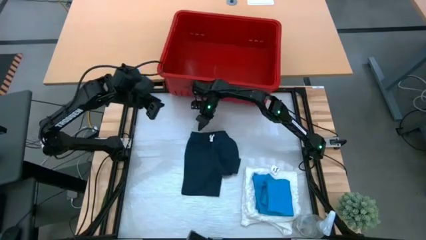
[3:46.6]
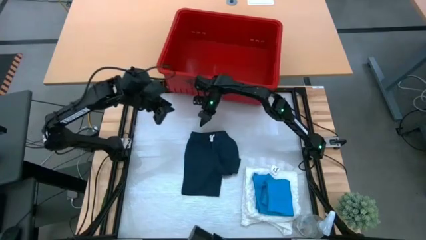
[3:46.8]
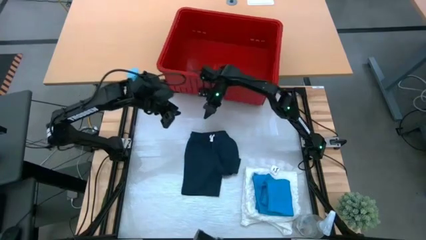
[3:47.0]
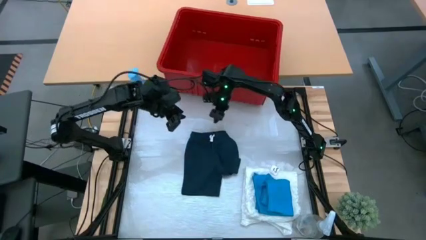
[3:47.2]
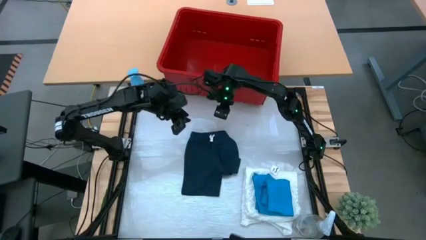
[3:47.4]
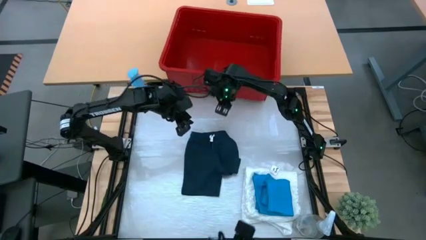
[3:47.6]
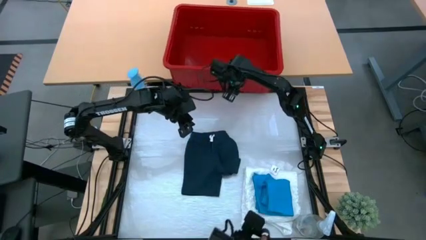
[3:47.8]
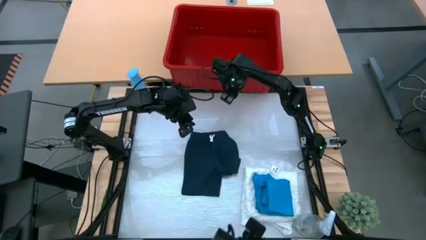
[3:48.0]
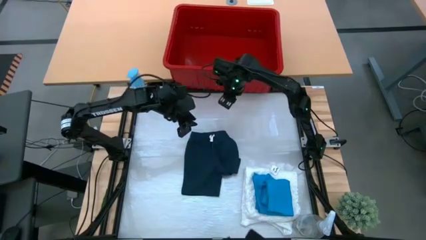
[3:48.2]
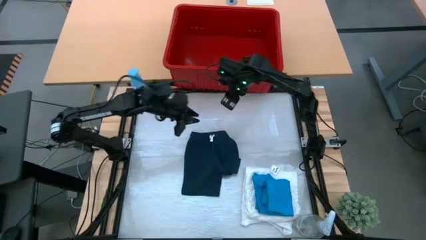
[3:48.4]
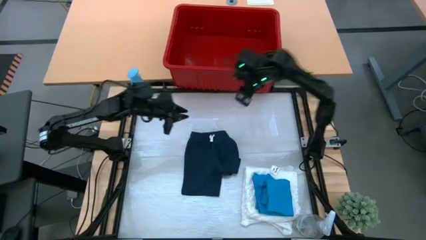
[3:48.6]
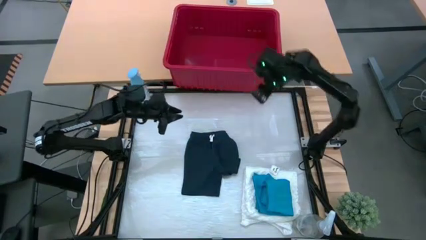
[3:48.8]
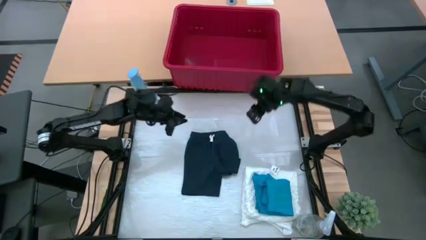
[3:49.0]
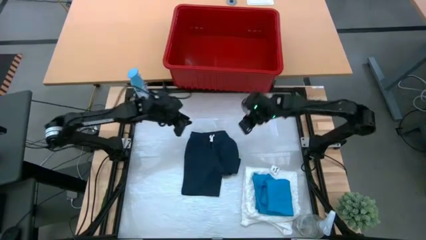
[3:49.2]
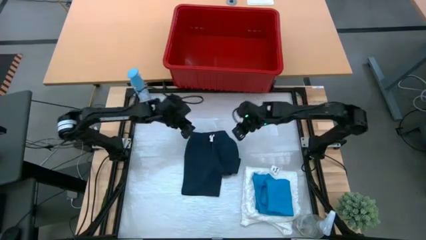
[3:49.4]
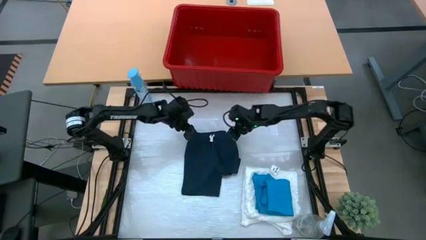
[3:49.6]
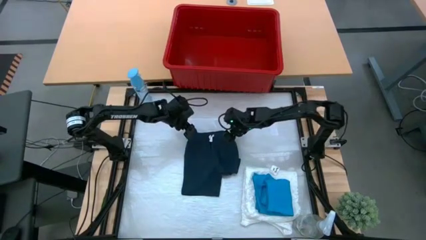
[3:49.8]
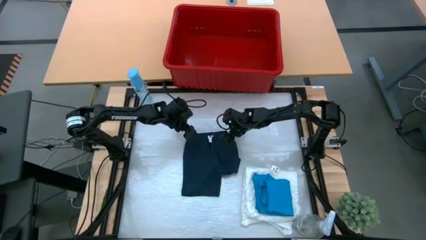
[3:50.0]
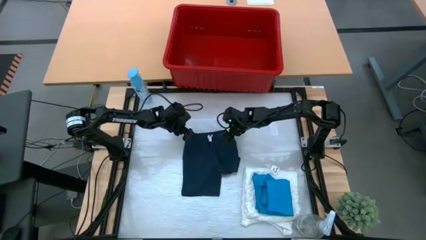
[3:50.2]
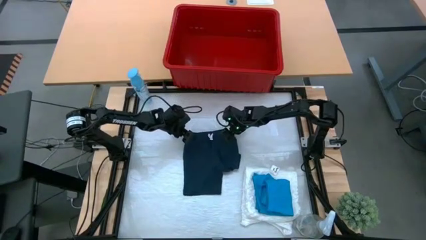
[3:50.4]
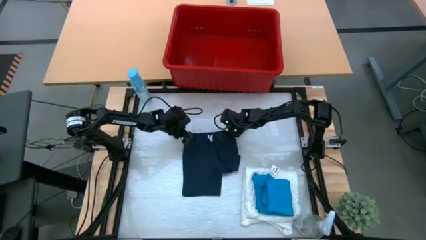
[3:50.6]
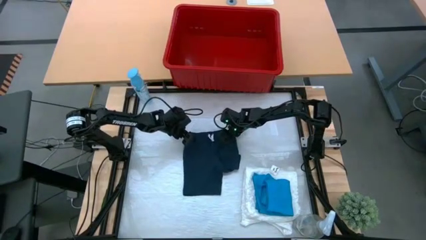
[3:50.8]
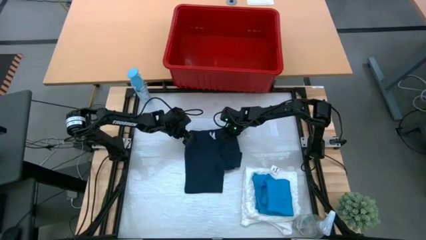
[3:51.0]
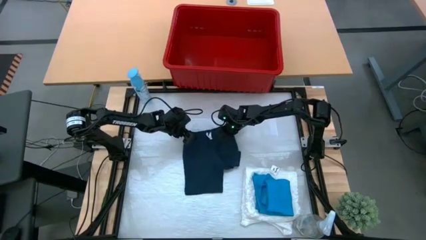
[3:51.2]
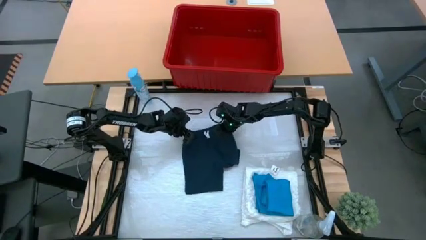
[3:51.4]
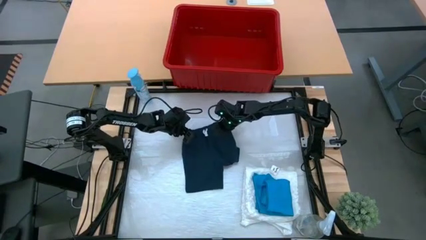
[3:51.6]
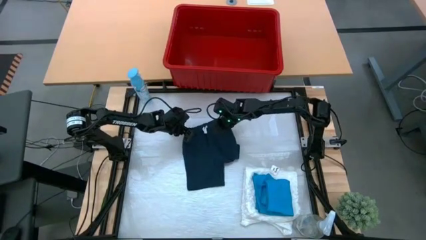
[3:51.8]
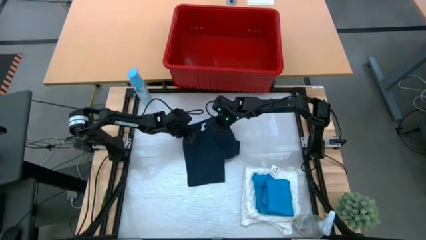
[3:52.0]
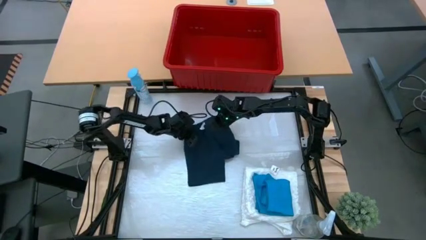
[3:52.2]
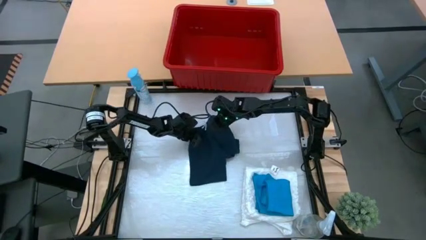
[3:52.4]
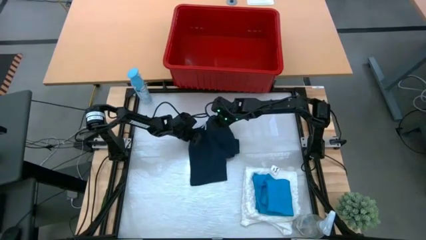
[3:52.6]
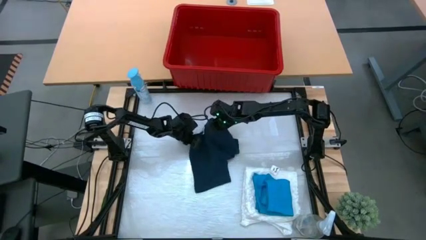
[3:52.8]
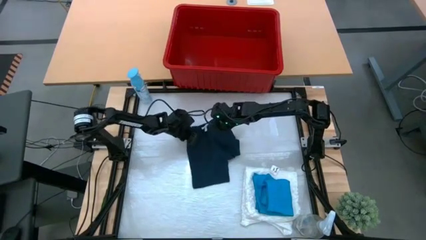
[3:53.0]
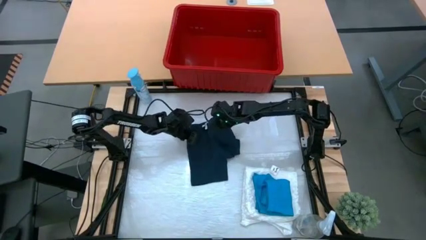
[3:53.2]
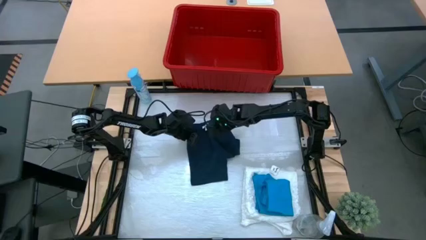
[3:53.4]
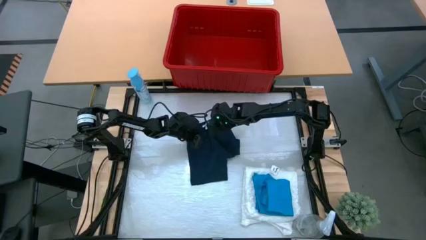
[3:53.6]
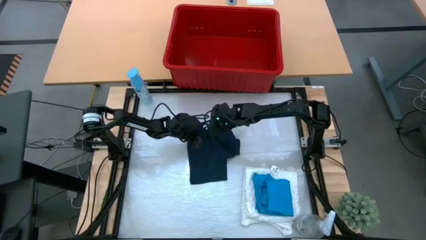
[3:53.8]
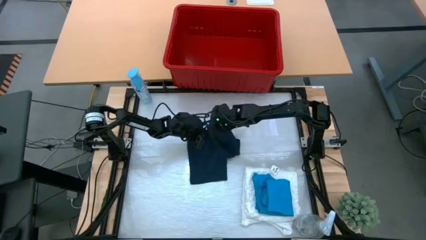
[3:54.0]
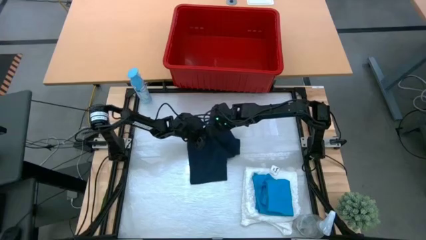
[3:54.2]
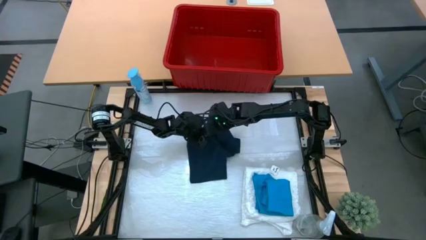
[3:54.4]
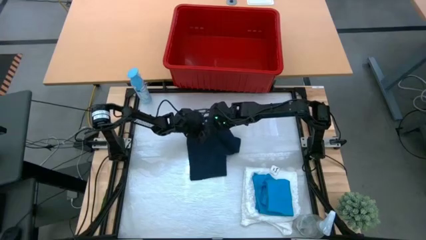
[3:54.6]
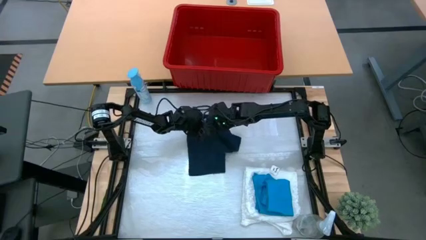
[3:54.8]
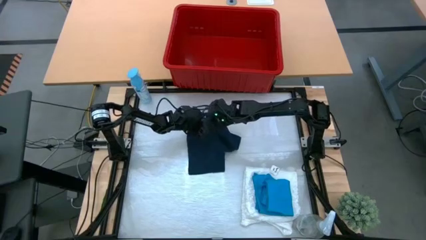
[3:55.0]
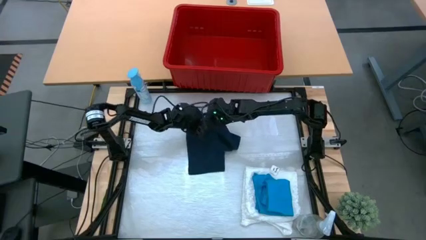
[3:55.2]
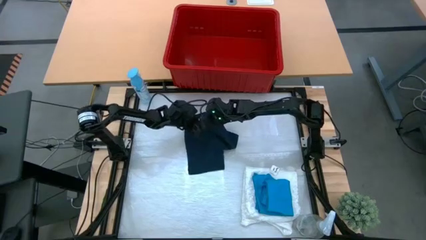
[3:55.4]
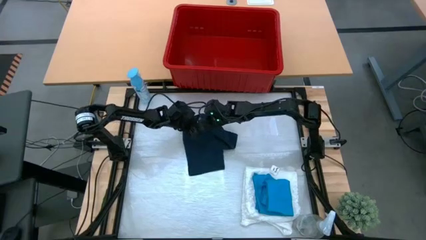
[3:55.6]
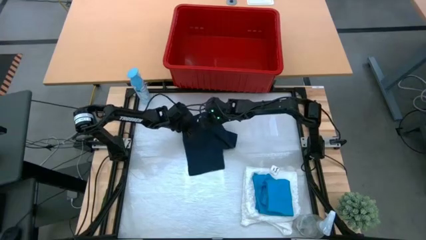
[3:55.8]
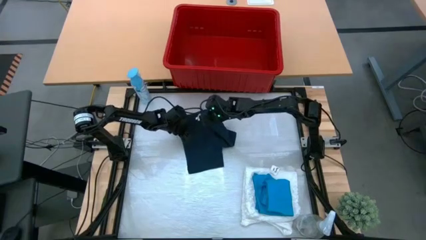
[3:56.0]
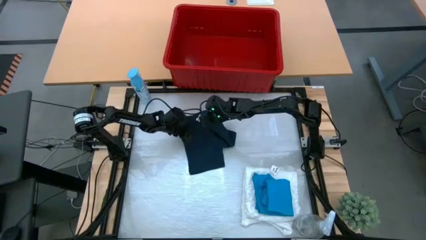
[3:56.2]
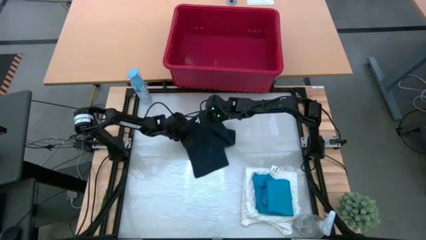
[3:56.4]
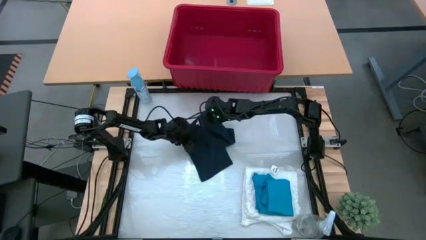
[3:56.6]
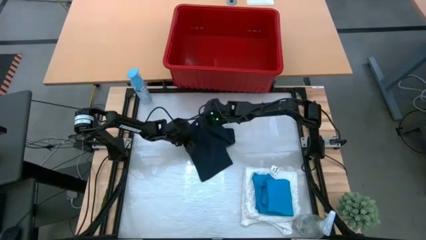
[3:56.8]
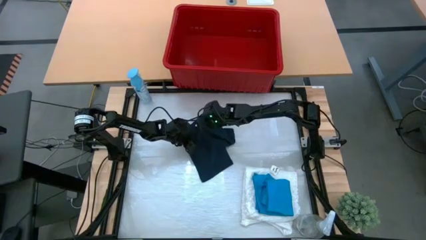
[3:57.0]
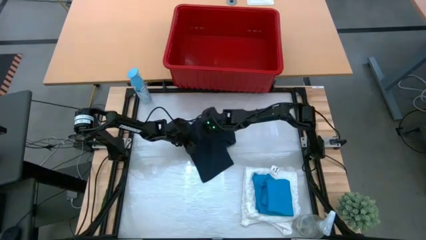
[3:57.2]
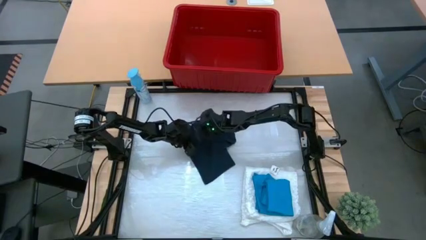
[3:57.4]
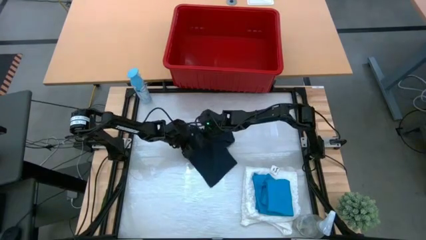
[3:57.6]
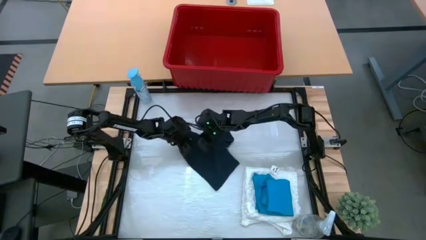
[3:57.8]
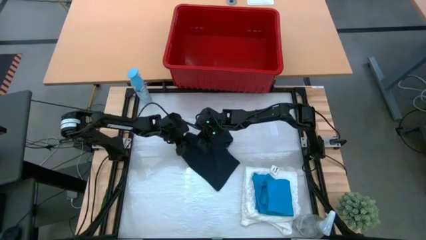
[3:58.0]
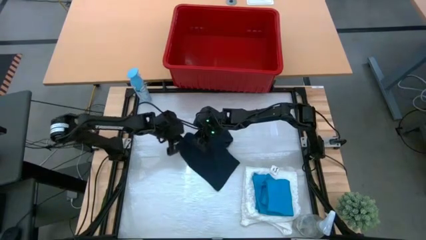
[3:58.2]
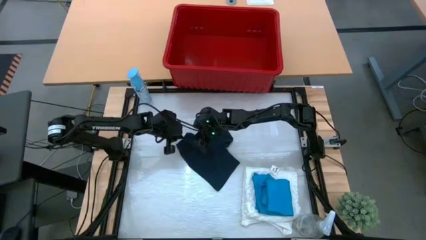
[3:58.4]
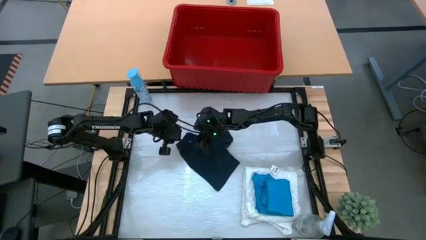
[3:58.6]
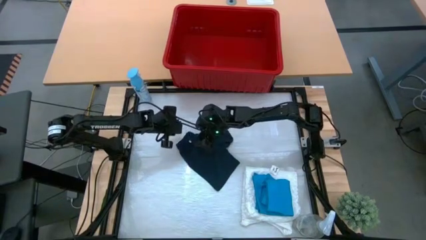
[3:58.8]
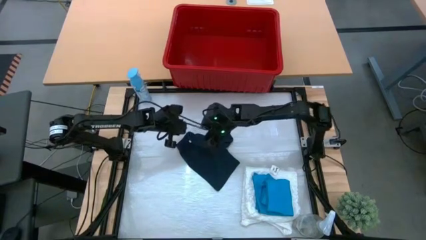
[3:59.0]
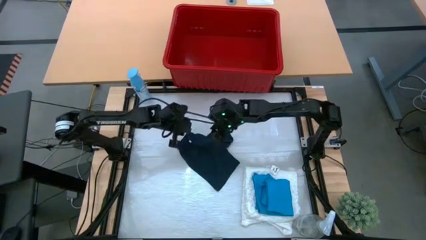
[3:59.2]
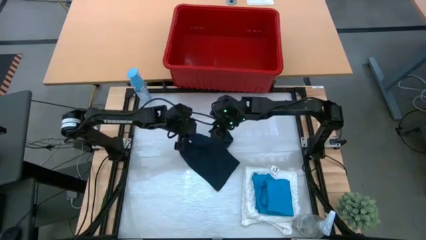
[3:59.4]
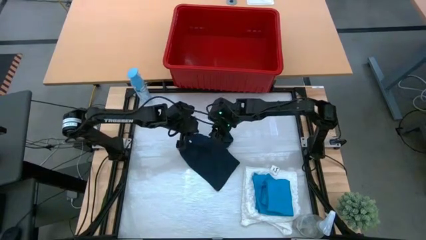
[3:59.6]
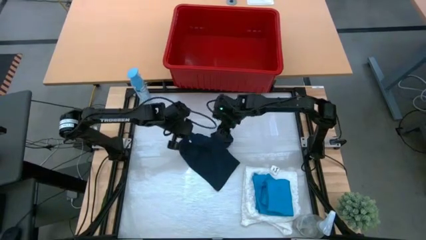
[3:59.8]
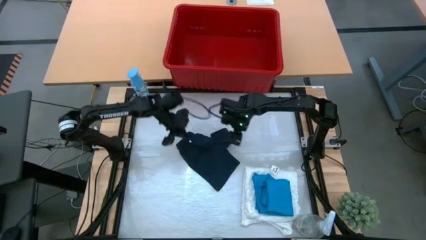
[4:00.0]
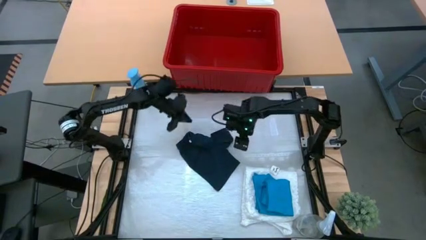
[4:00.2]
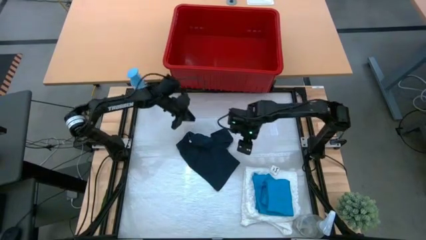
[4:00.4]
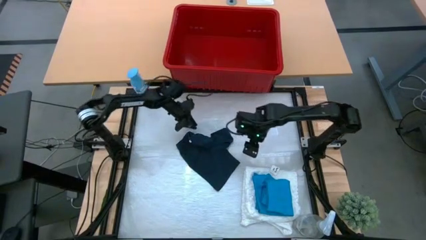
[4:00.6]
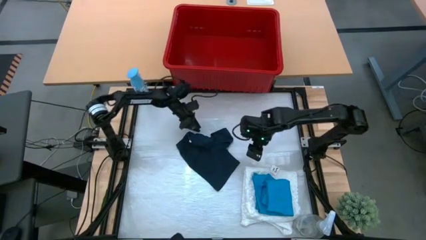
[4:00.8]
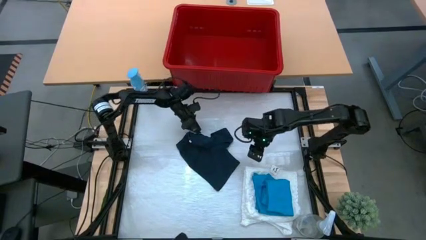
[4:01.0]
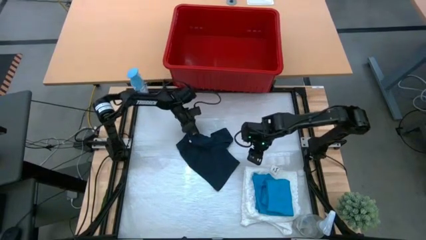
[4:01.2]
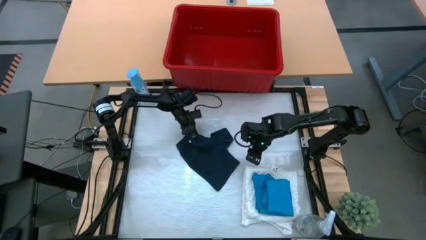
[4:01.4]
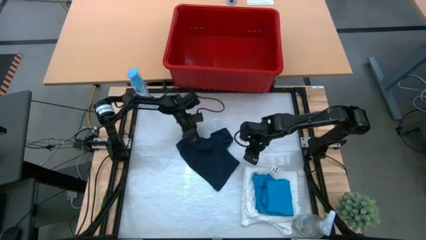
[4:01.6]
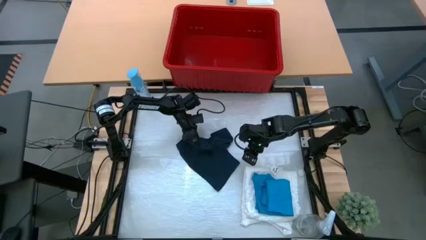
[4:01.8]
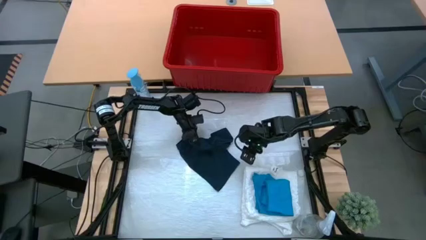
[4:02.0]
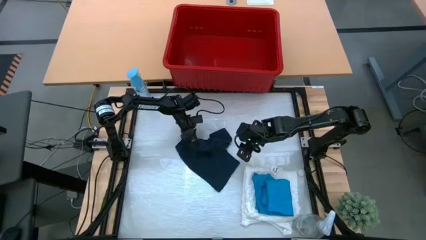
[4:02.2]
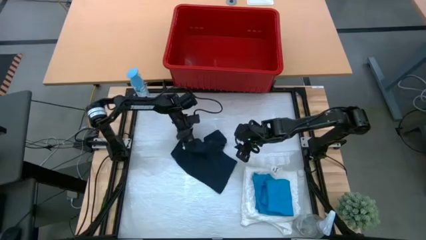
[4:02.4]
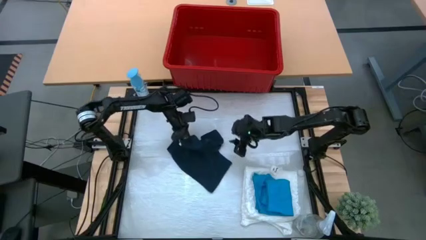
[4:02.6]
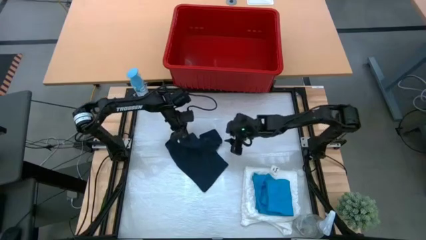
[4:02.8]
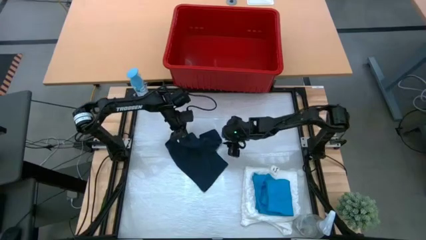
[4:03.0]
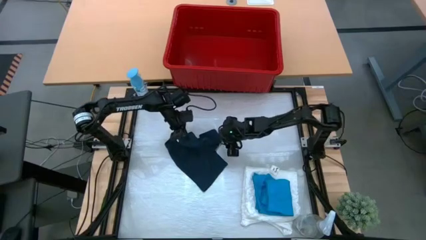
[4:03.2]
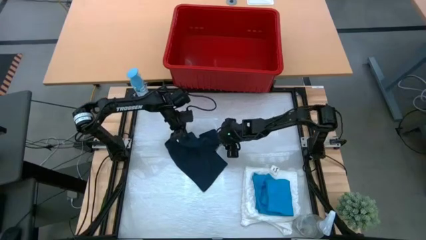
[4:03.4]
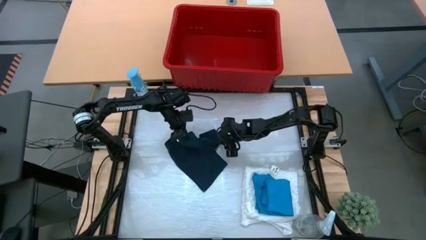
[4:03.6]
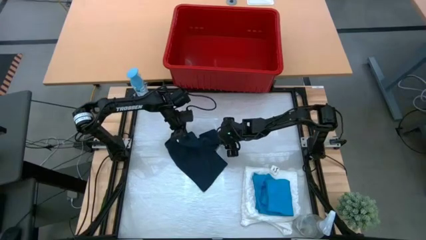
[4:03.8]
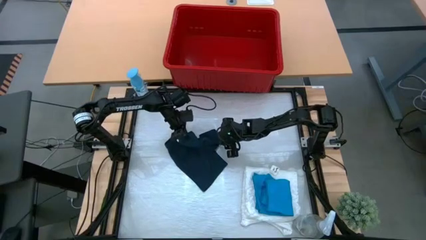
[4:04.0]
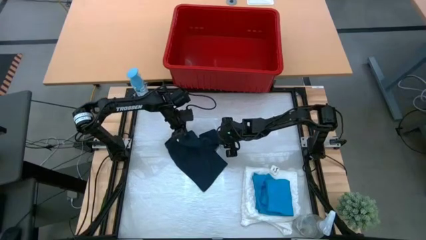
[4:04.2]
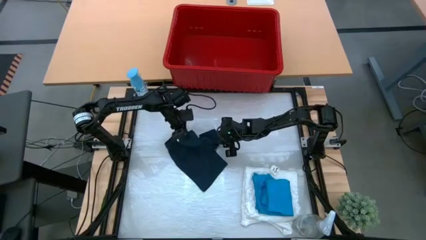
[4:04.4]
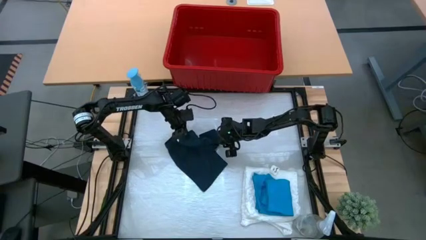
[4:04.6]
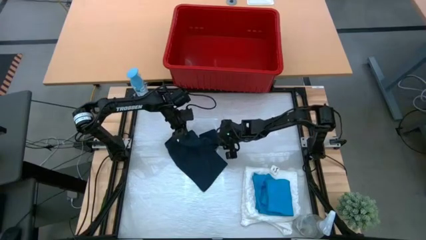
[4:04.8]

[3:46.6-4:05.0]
Task: Fold laundry
Fold the dark blue shorts
